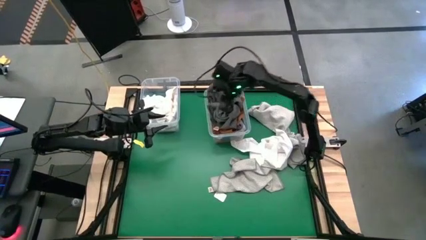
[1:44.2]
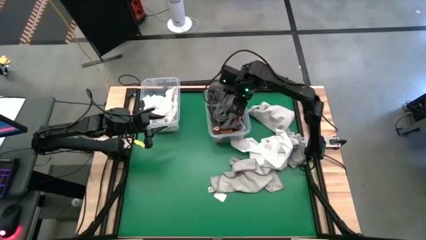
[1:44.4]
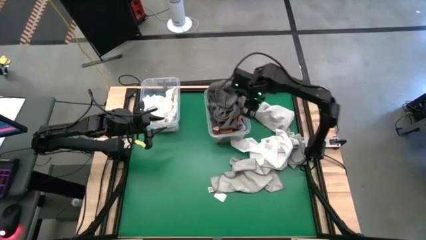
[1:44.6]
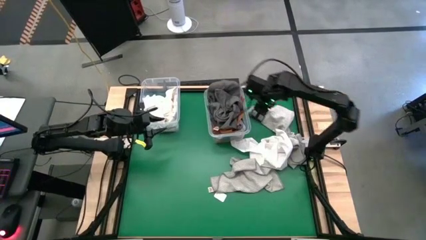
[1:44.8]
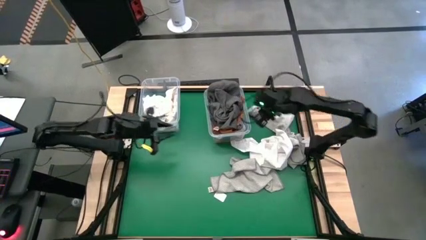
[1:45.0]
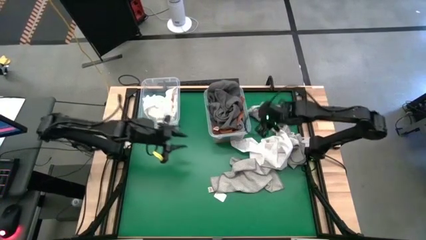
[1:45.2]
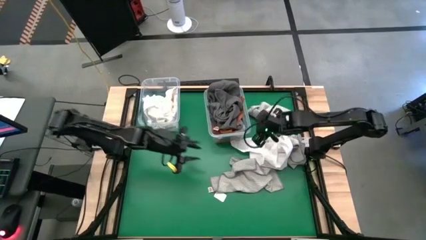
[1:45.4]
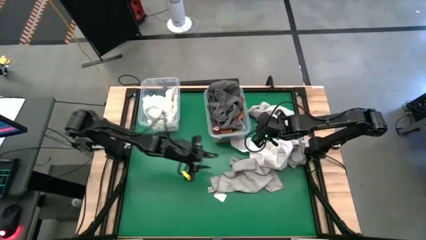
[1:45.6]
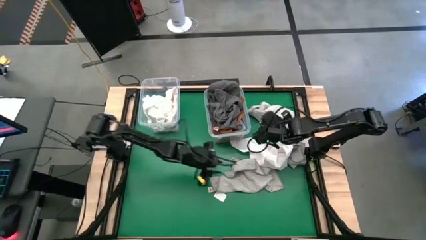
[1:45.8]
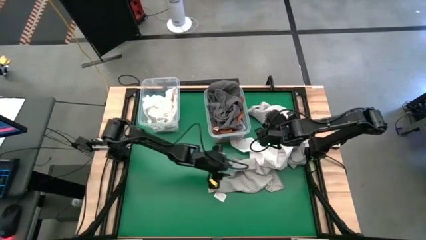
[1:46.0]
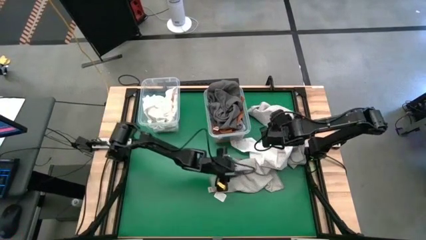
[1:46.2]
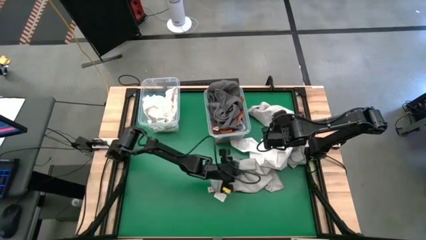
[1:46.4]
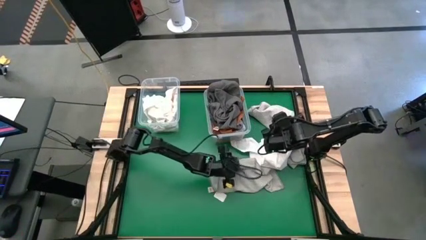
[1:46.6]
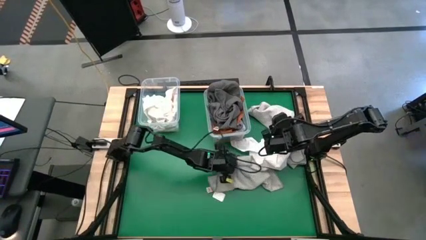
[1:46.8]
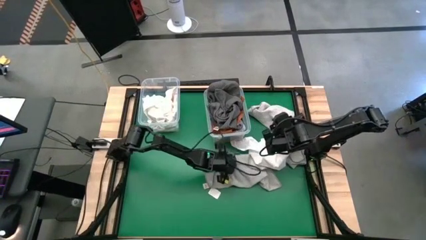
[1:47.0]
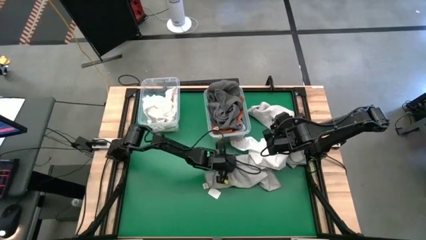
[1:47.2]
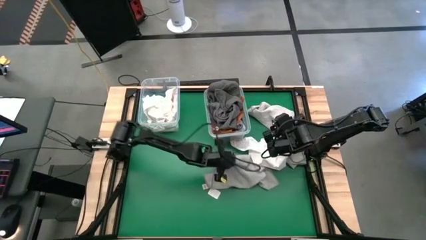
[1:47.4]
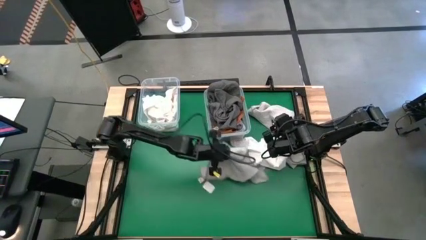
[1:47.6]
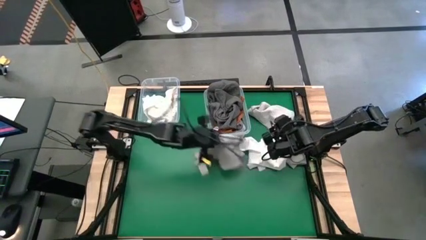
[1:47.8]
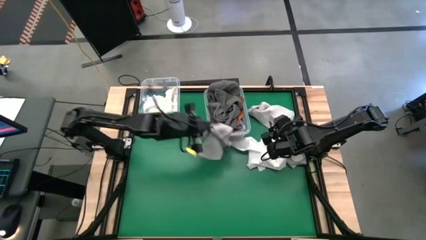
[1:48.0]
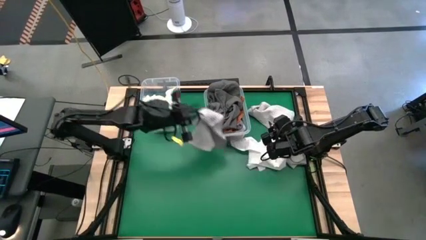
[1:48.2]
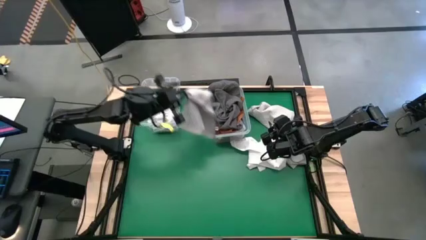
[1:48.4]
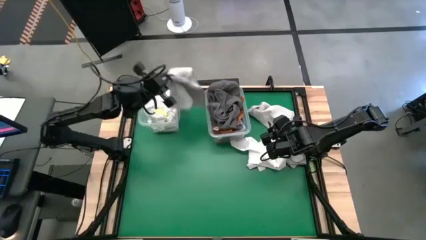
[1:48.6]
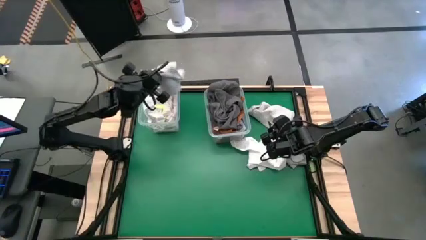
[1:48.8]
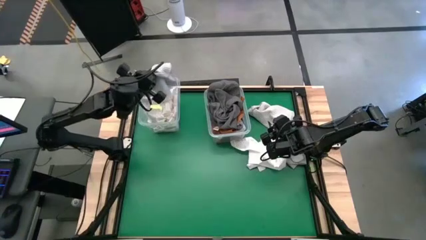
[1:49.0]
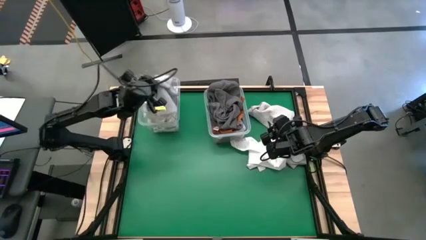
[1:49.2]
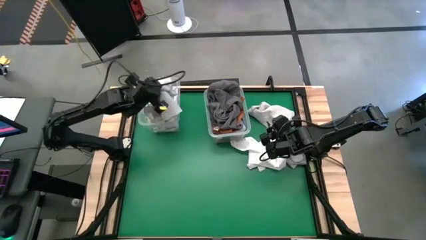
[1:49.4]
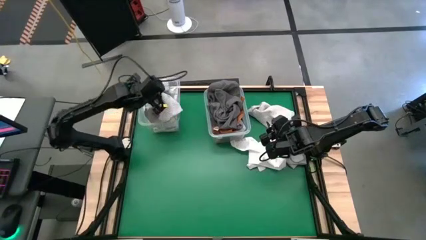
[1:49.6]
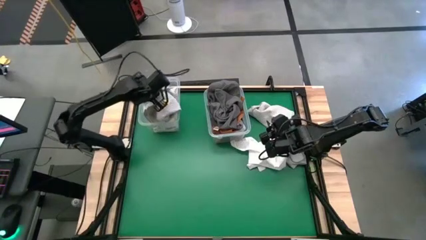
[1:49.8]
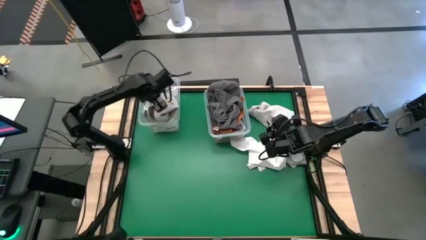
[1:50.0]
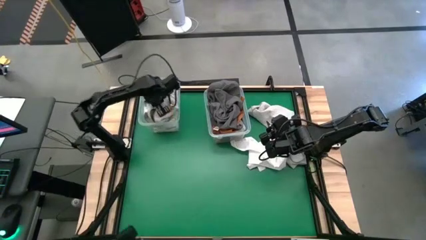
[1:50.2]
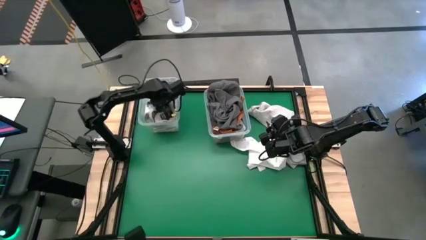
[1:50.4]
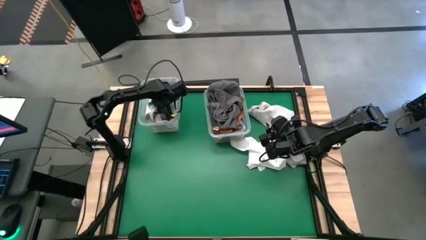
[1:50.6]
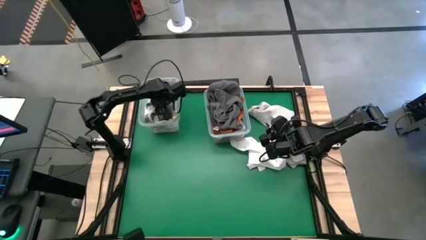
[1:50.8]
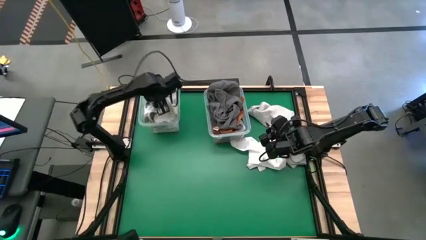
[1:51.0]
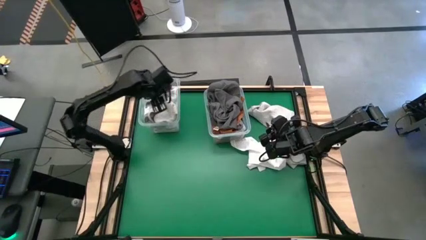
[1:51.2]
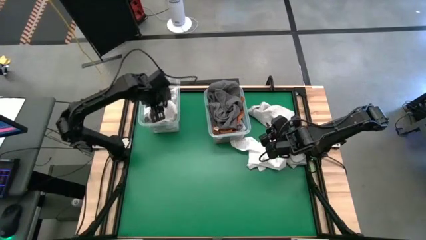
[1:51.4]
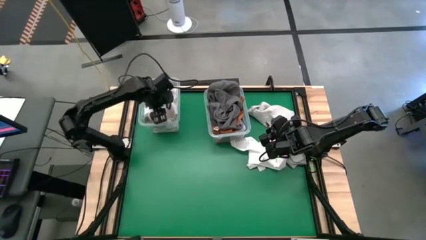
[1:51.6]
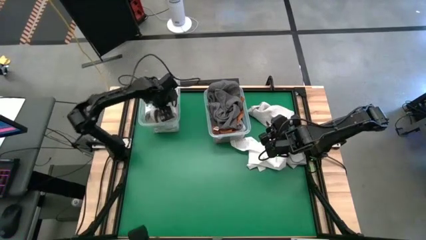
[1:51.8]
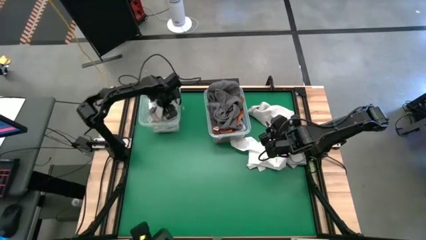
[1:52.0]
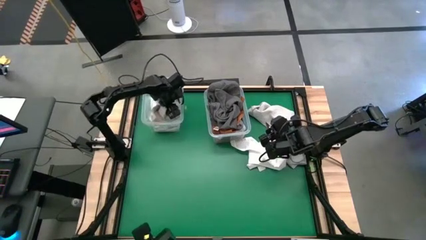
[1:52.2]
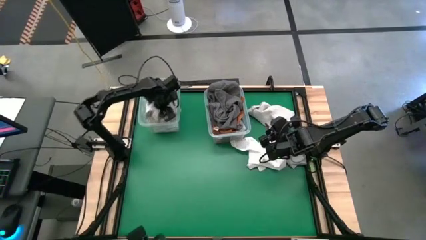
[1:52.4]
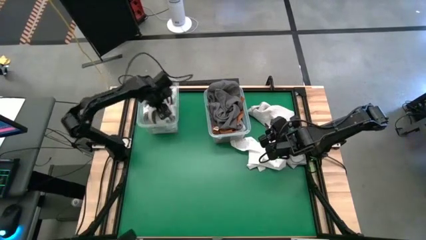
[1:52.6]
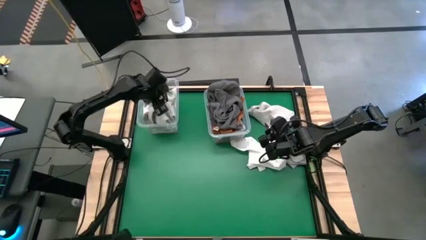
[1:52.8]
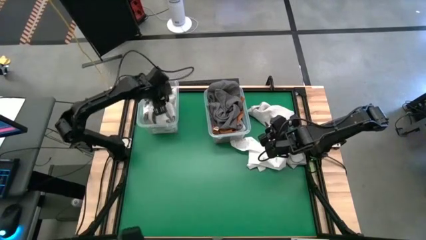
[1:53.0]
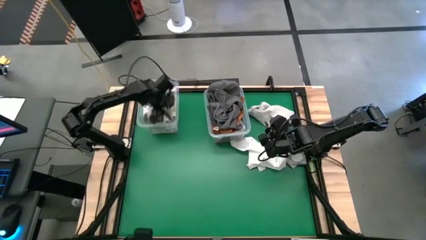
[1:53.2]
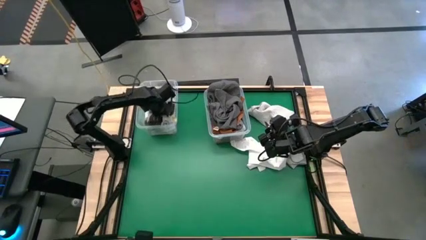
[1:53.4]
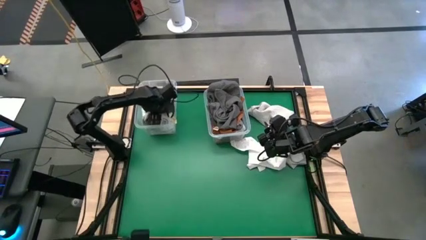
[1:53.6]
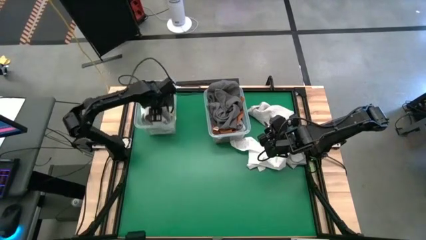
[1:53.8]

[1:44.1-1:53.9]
Task: Sort towels by color in basket
Put the light gray towel into the left transparent bin

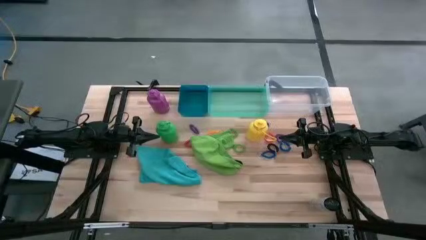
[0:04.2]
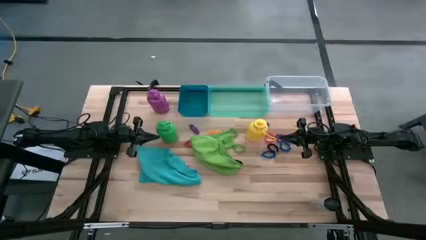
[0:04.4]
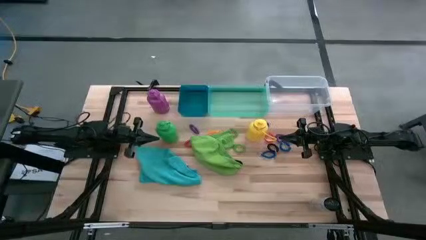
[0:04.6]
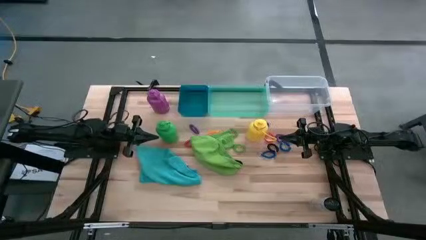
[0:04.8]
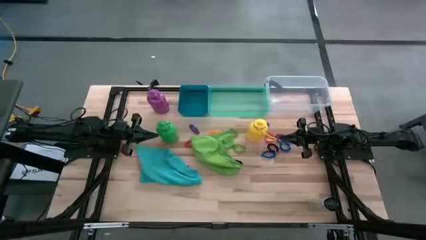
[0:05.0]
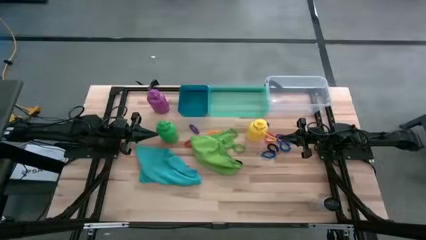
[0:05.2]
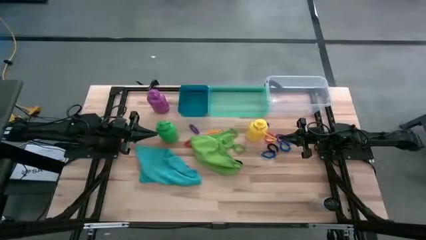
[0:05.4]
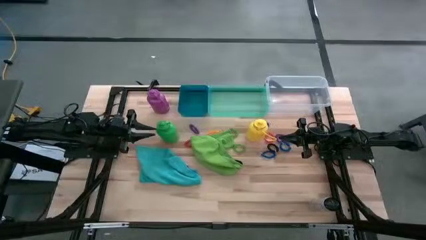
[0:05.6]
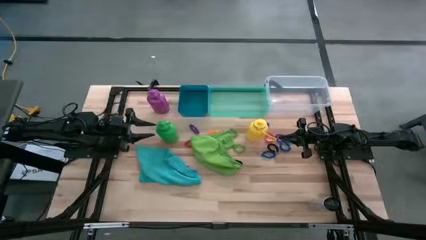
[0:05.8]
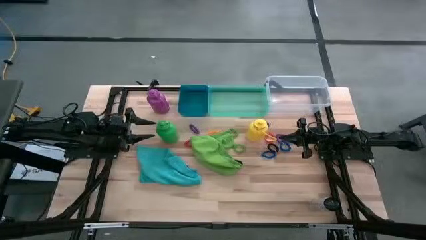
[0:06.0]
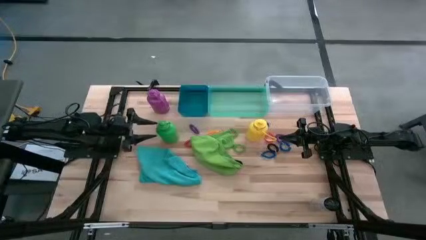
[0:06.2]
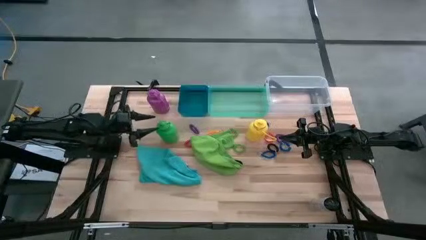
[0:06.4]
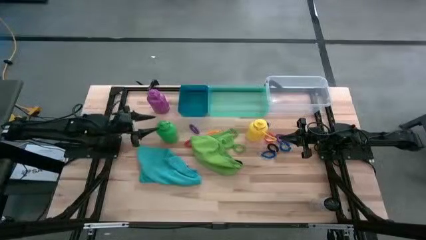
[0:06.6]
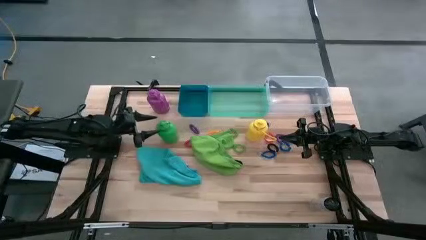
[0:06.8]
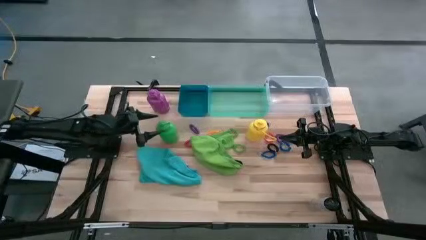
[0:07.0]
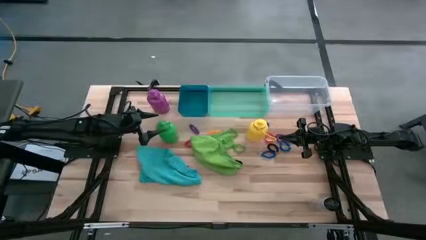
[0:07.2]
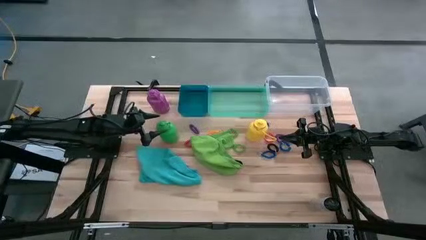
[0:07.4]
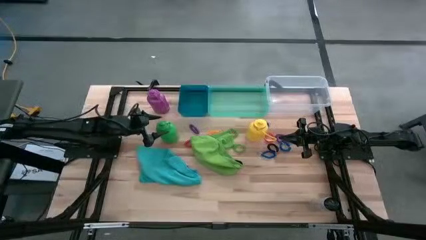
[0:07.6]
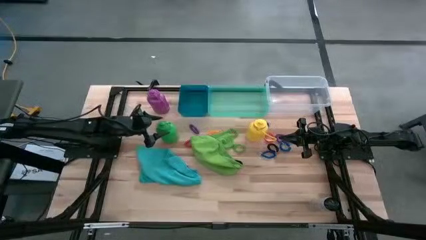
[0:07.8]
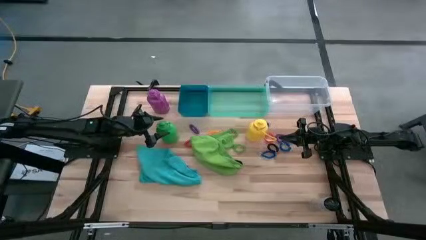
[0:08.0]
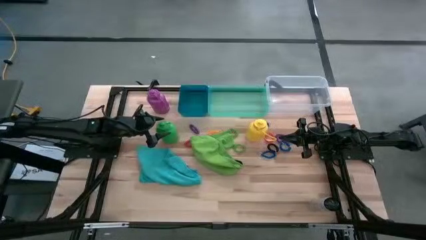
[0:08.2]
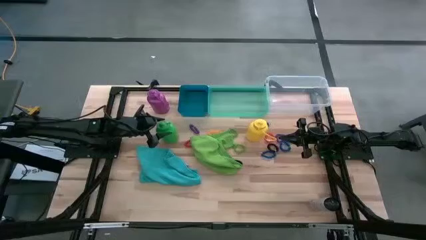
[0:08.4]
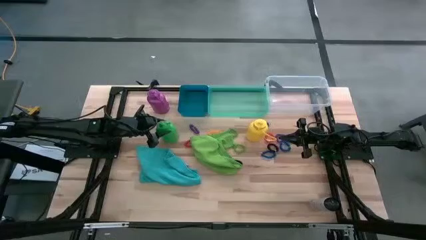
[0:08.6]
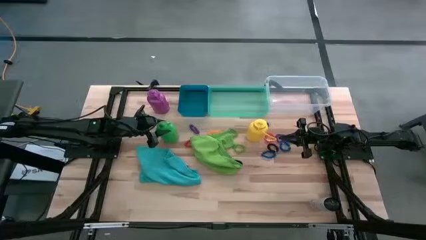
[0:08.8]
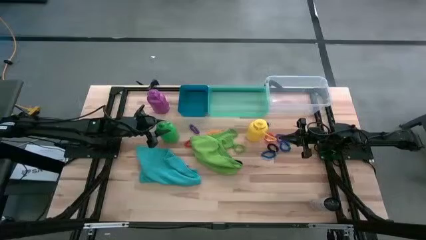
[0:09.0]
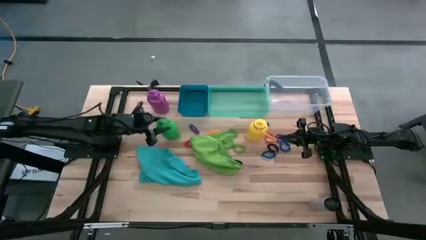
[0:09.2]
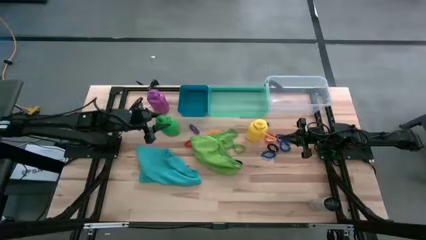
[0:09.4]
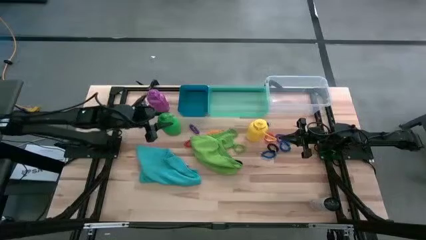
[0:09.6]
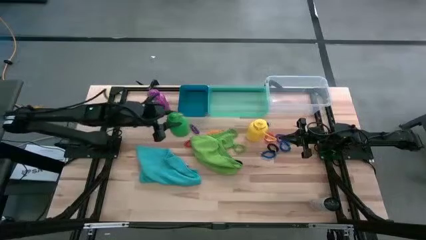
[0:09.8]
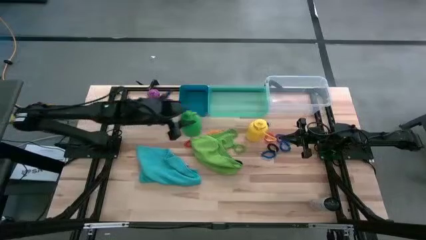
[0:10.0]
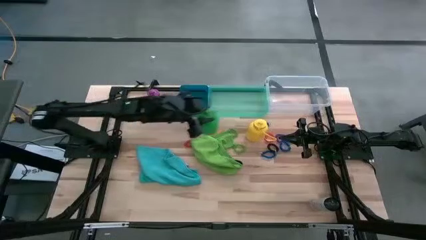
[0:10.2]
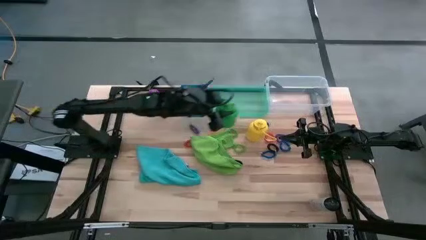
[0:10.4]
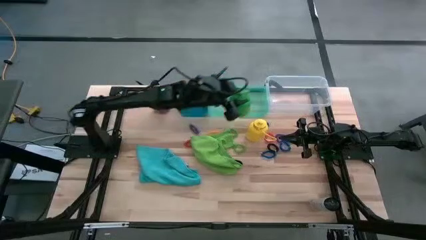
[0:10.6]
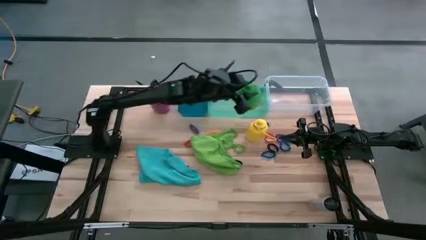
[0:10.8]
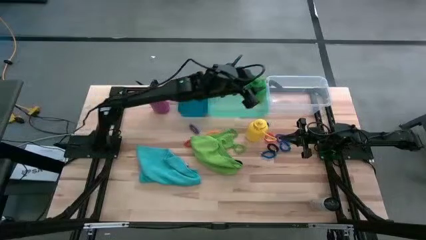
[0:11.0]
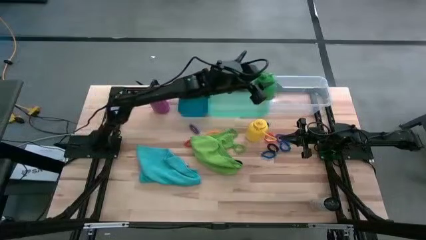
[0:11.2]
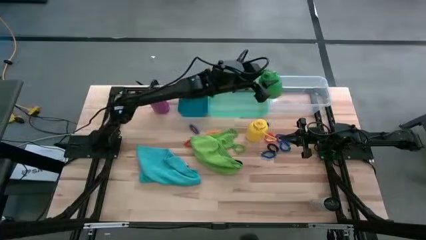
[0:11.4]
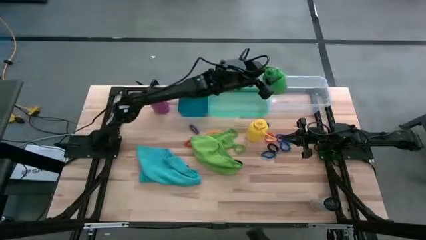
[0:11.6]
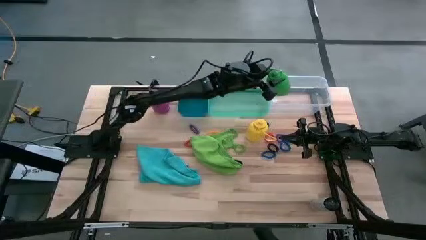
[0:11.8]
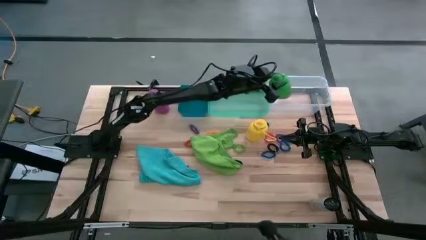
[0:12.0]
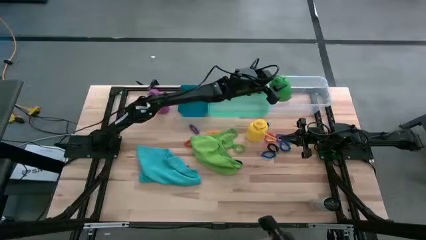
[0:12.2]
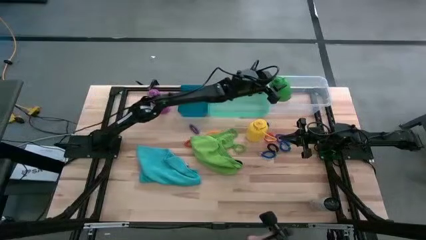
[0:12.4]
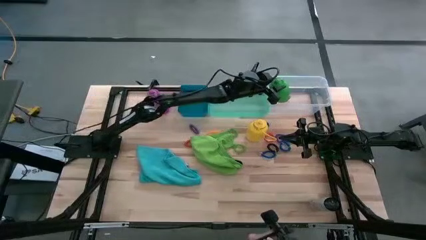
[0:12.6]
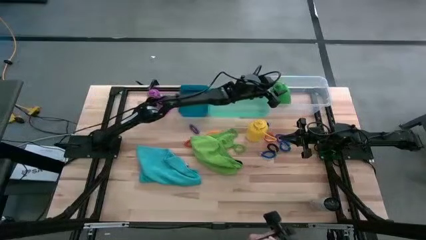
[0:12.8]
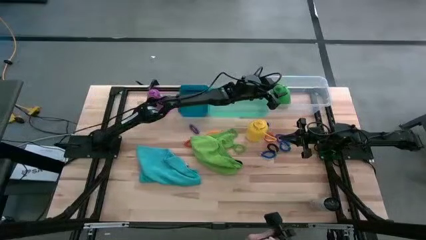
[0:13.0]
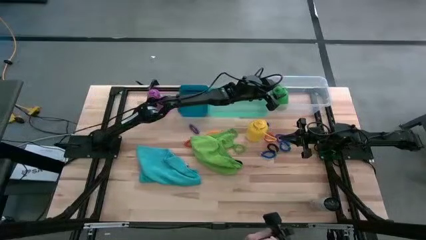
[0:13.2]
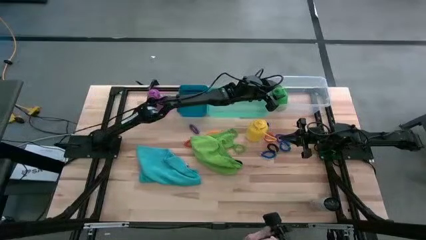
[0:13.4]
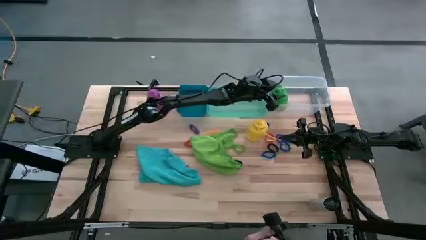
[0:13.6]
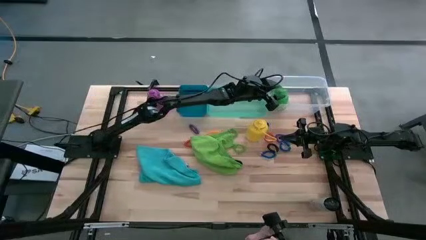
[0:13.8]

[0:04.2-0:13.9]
Task: Pick & Place Sports Items
Put the green tumbler into the transparent bin
